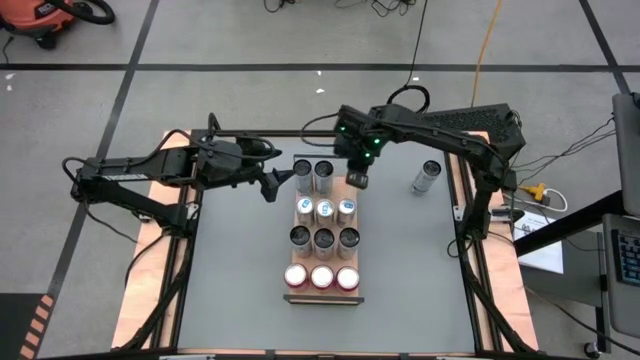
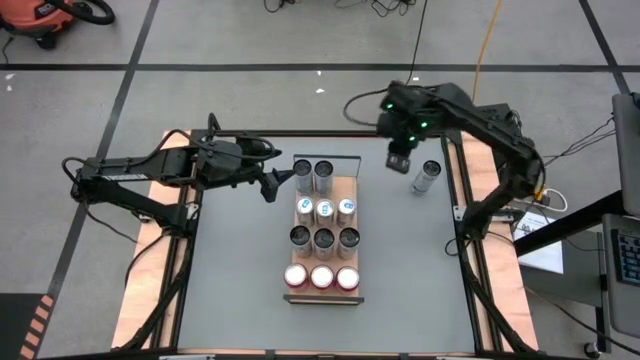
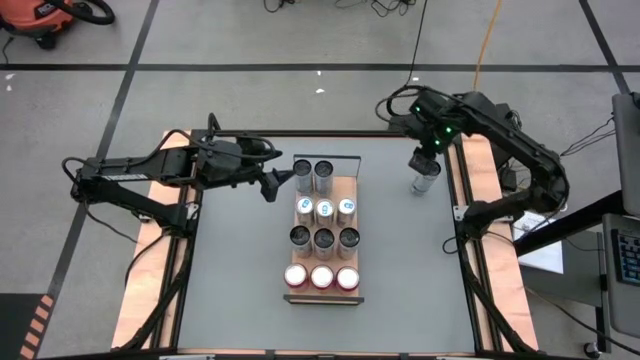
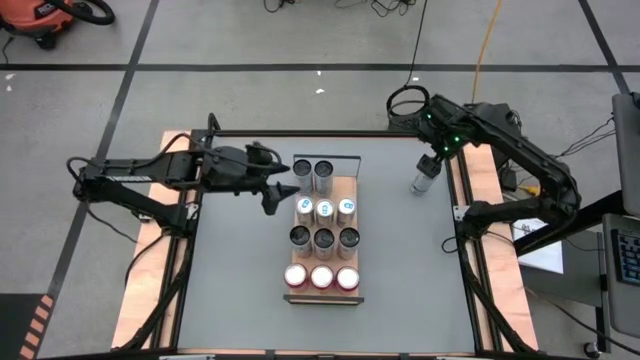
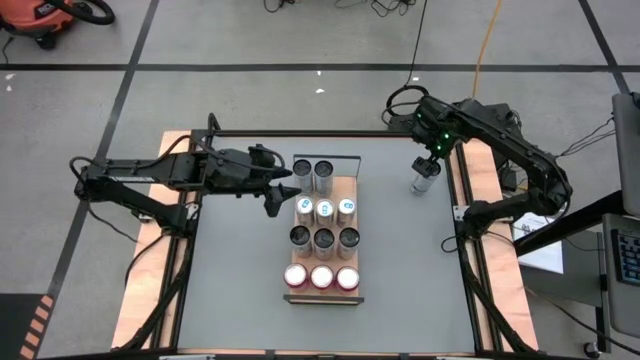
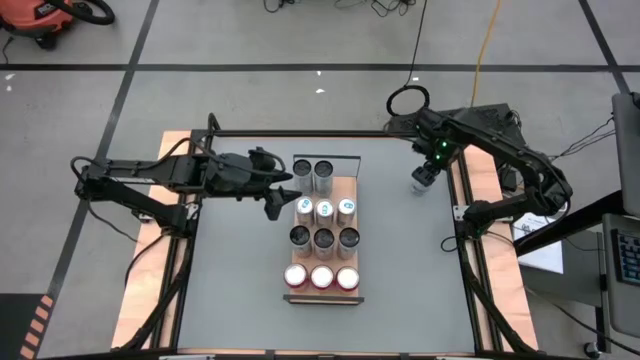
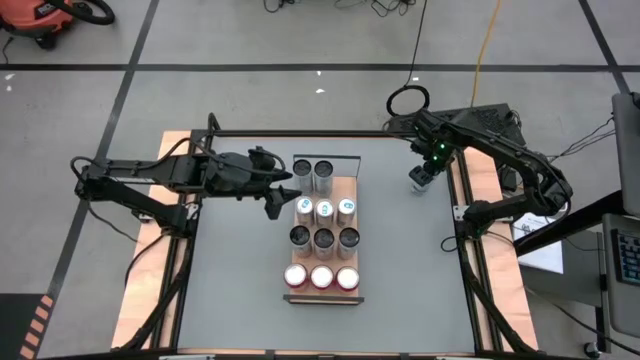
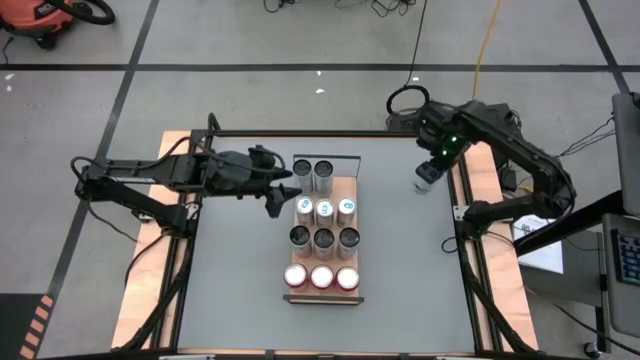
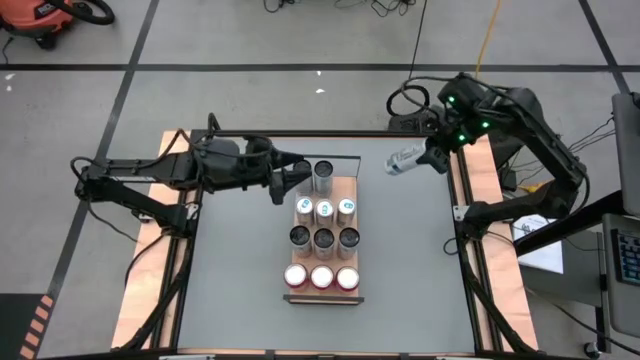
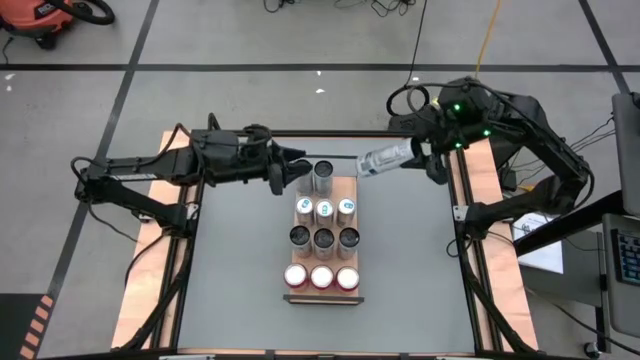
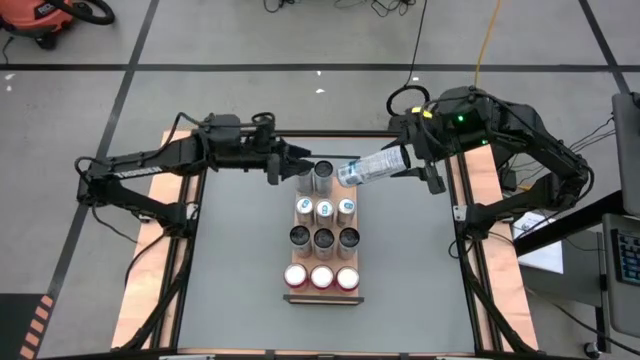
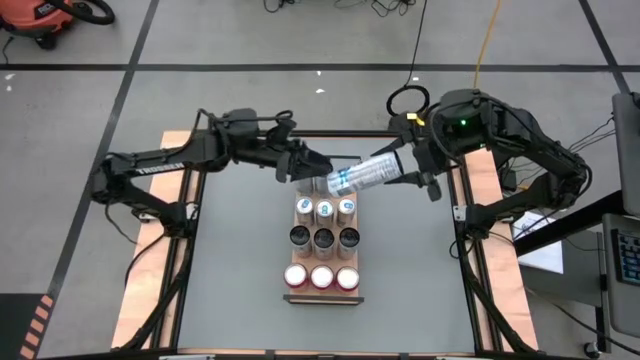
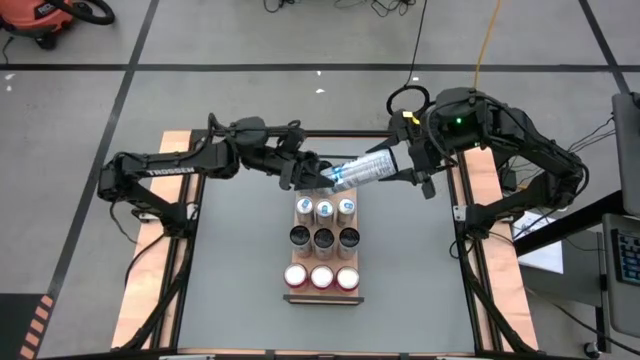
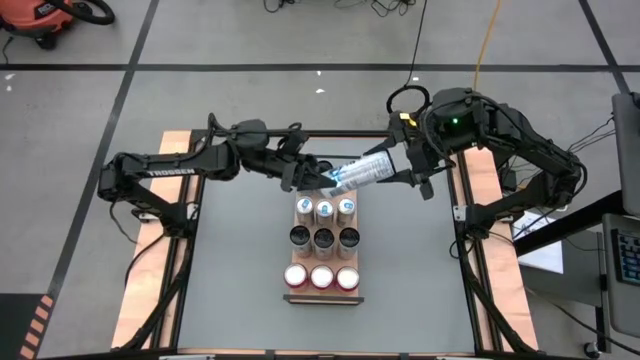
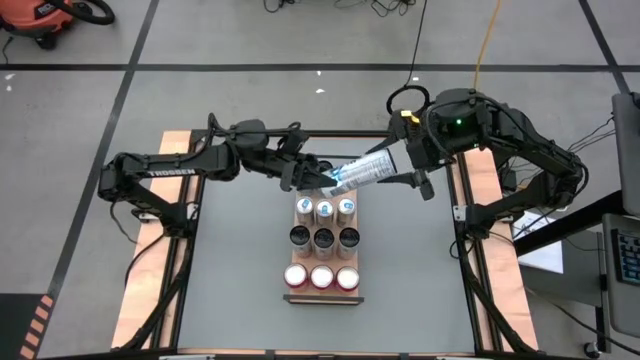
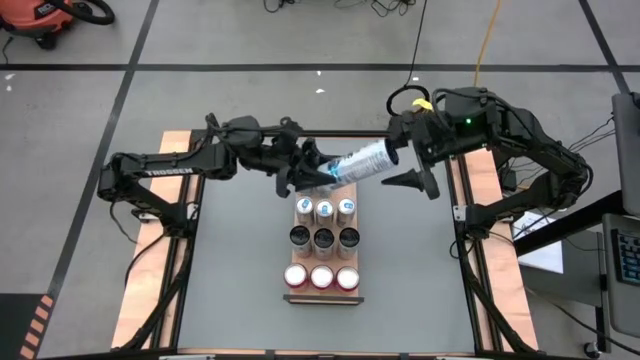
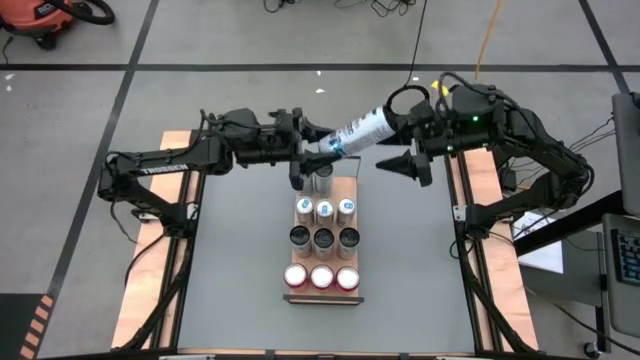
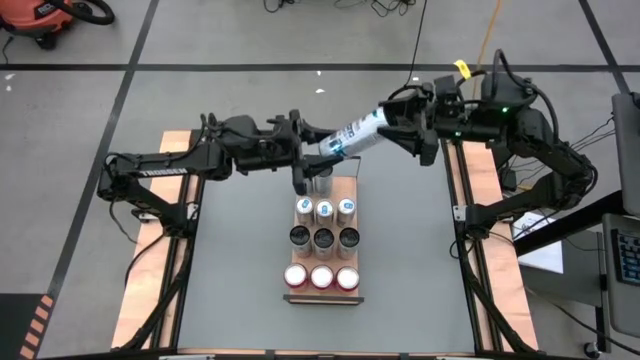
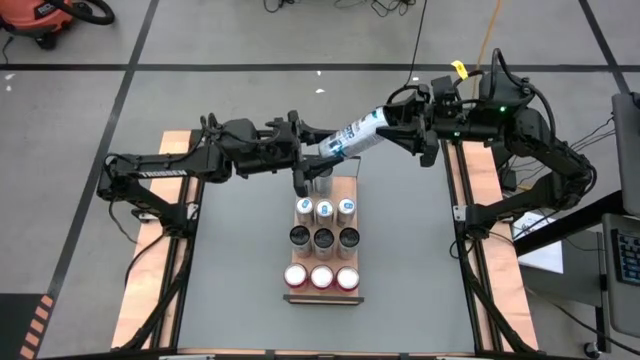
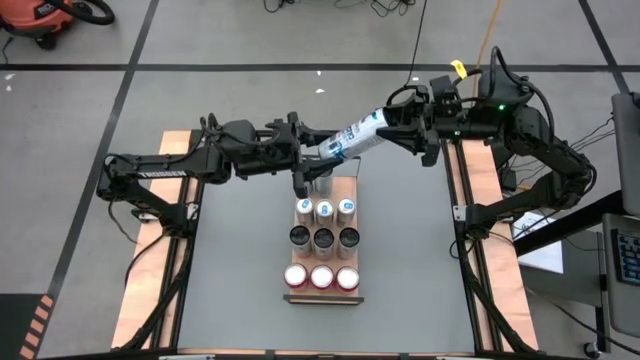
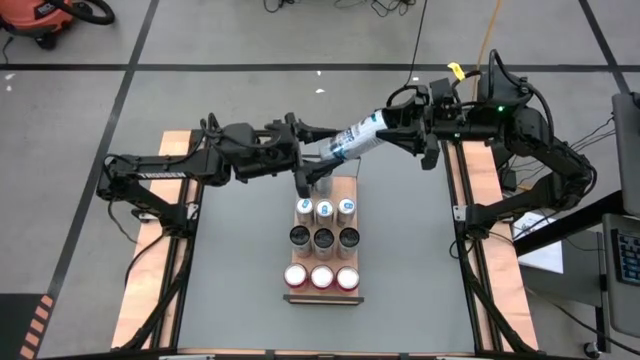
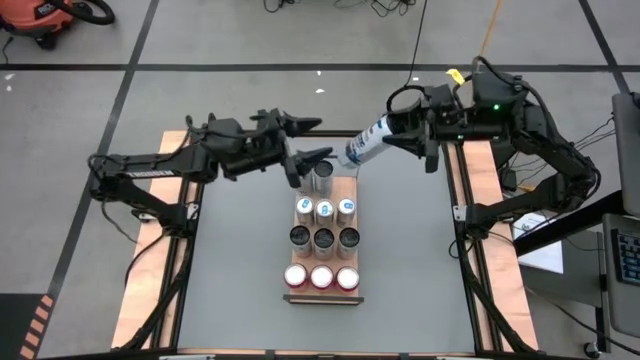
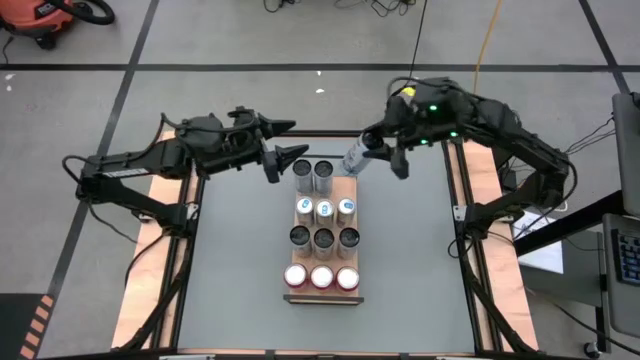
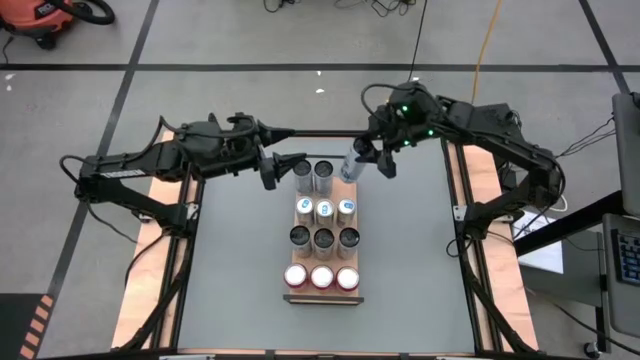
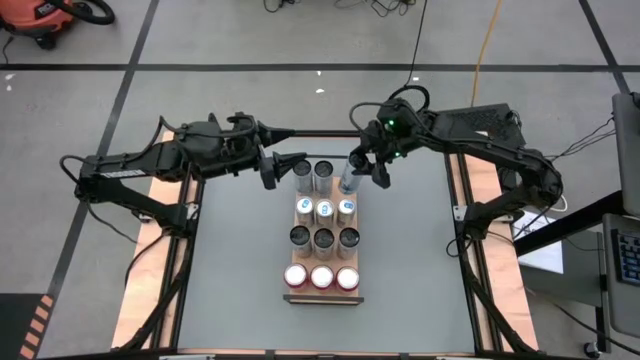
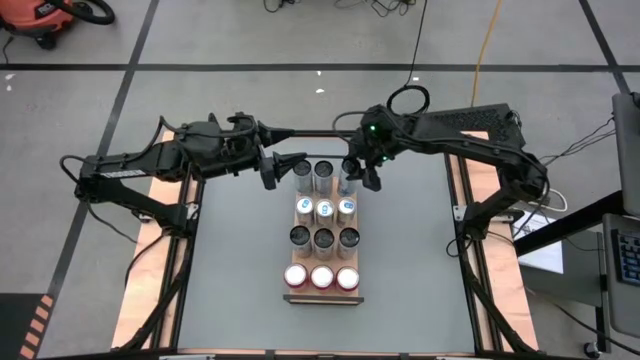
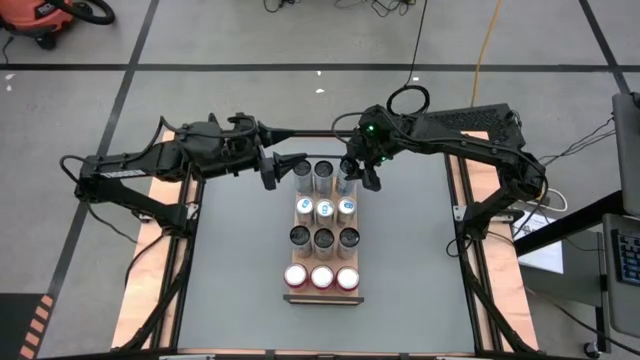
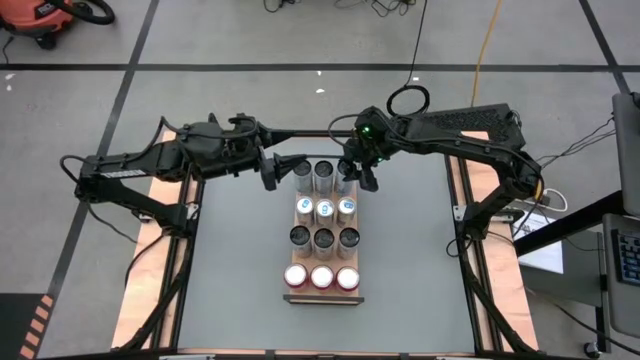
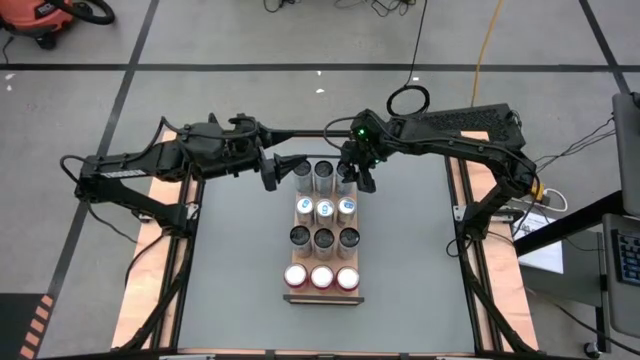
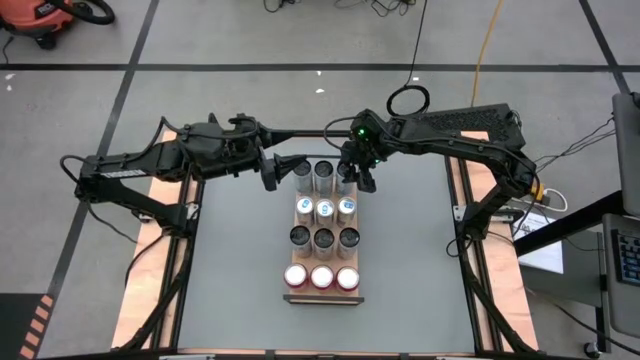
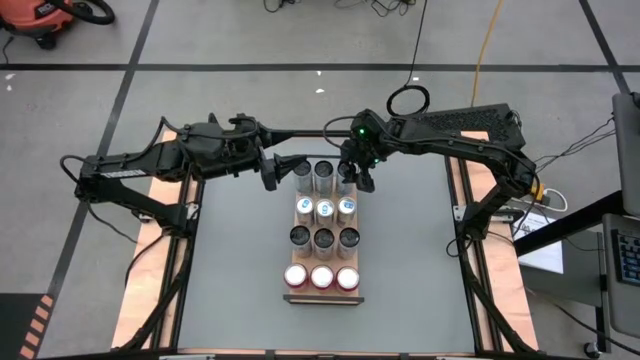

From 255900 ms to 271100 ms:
Task: Sort soda cans
Put the white blue soda can on the shelf and align it with the other white blue soda cans
